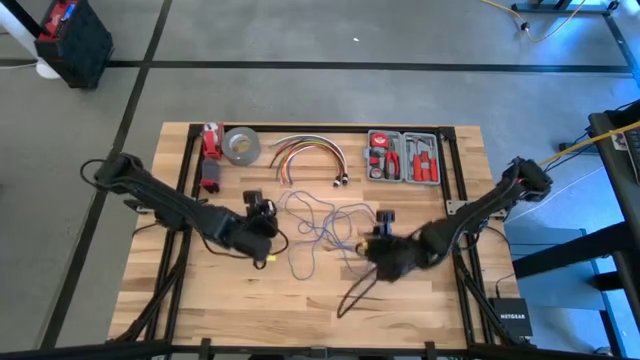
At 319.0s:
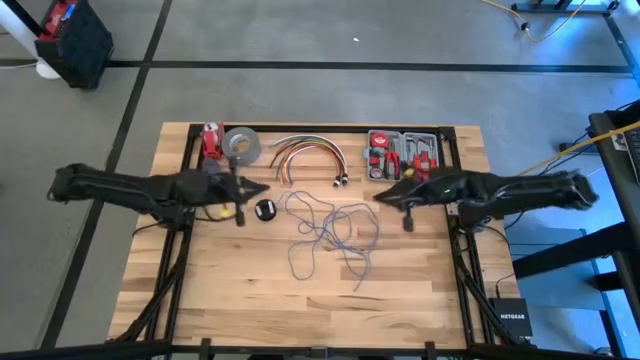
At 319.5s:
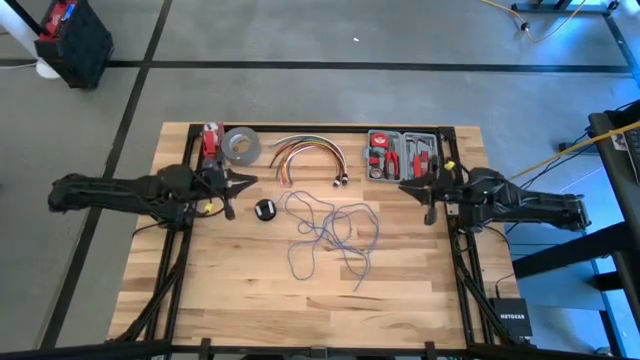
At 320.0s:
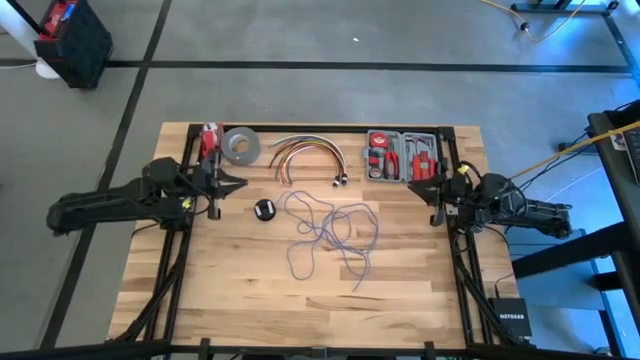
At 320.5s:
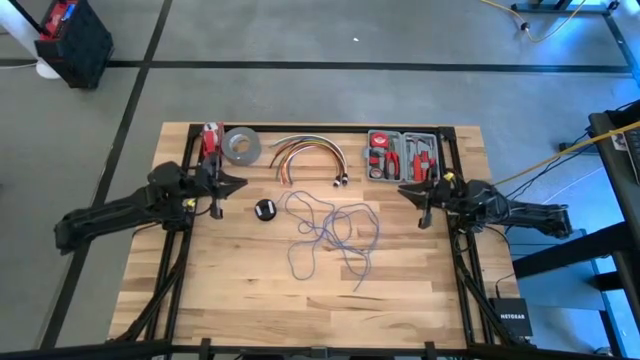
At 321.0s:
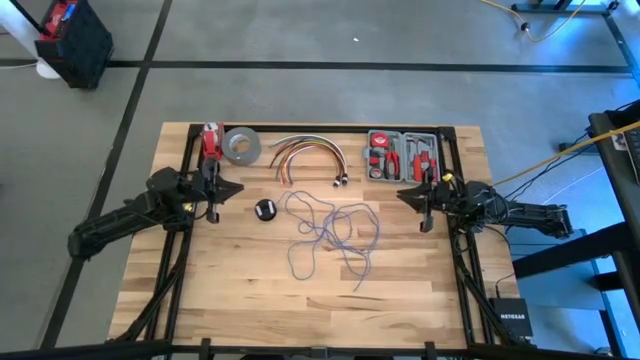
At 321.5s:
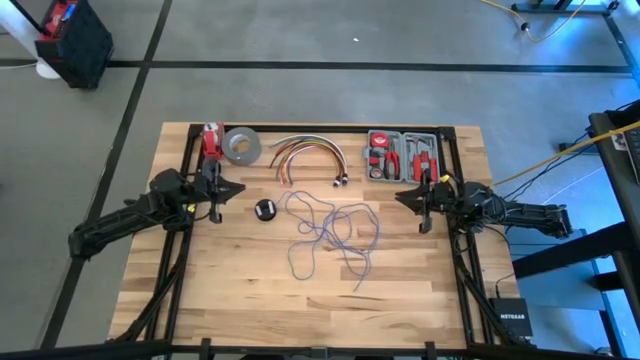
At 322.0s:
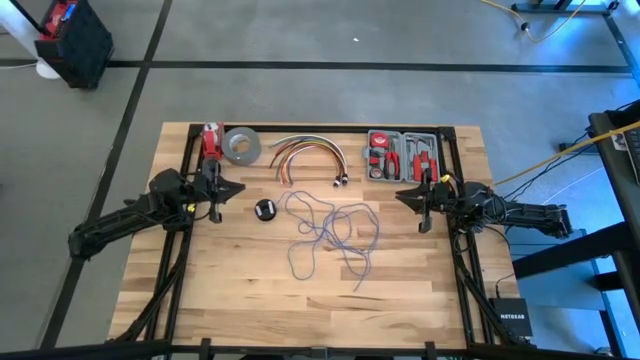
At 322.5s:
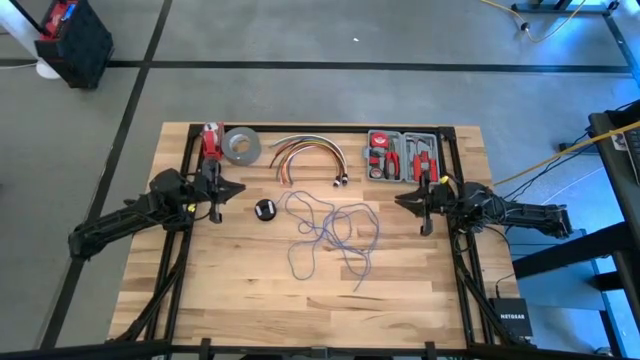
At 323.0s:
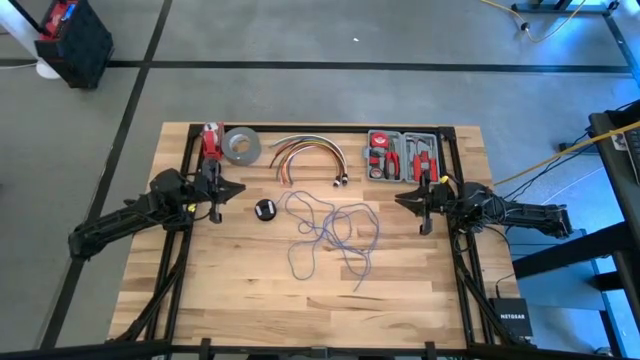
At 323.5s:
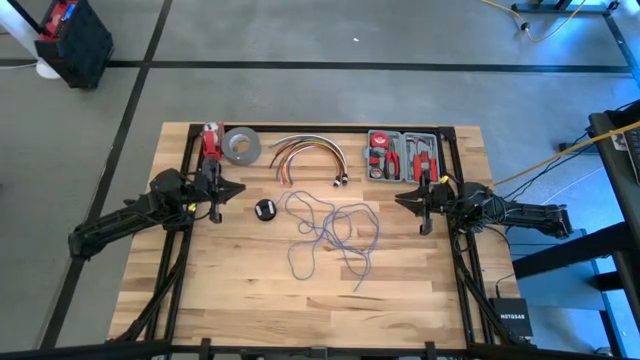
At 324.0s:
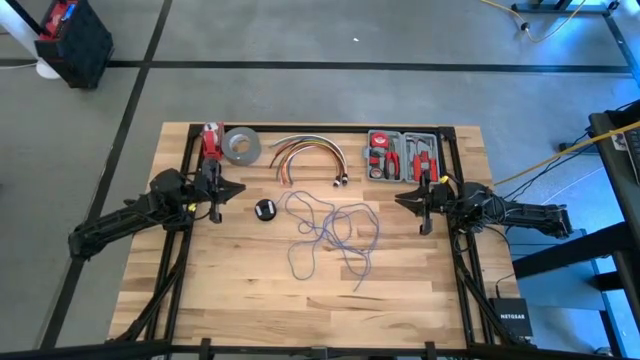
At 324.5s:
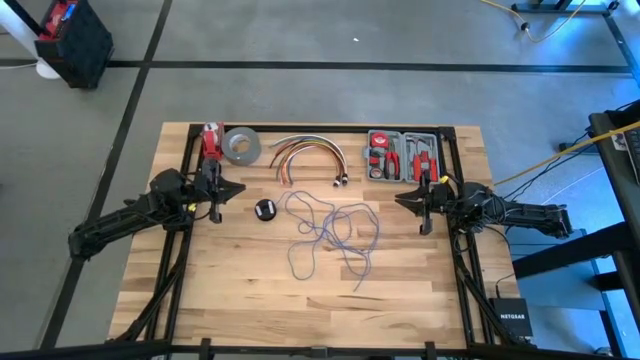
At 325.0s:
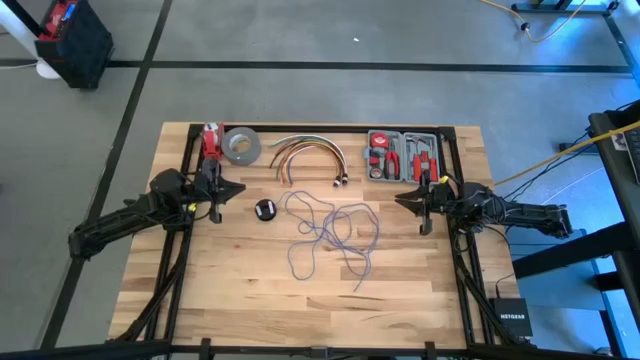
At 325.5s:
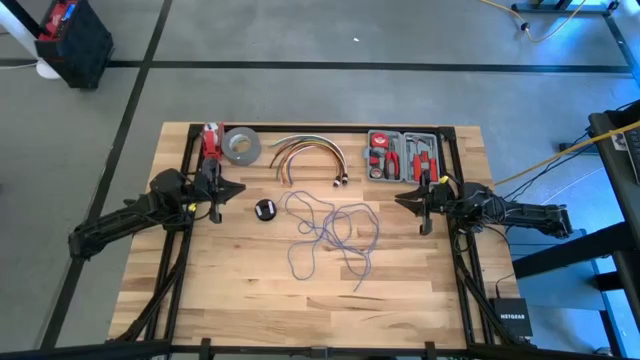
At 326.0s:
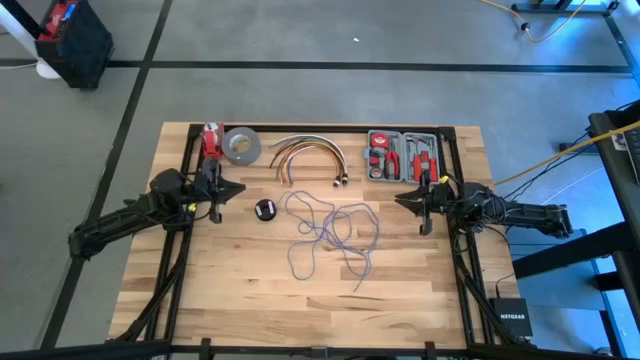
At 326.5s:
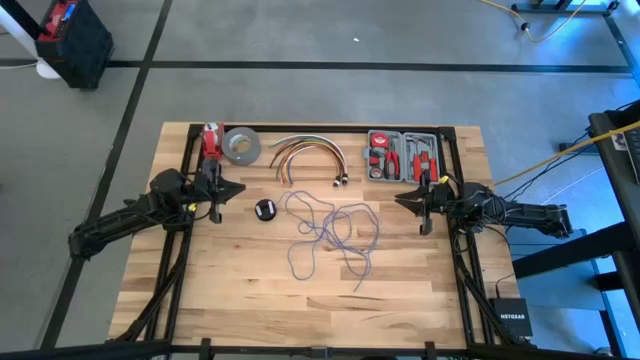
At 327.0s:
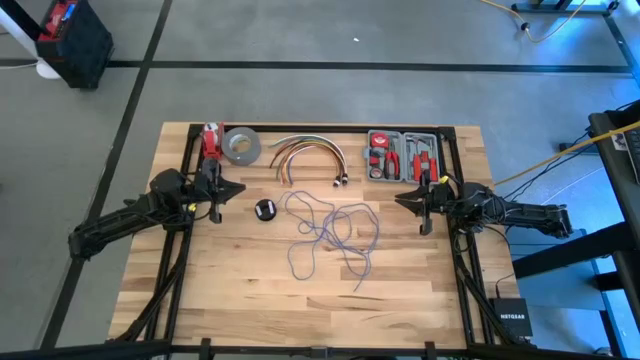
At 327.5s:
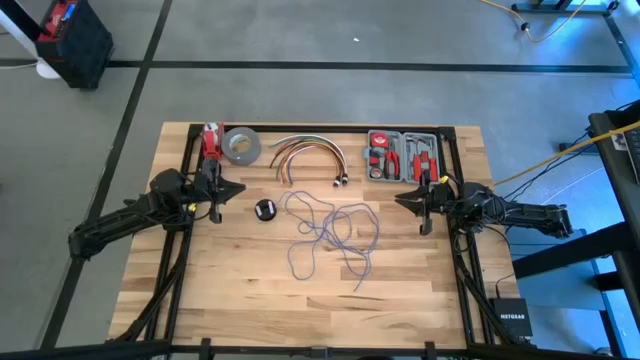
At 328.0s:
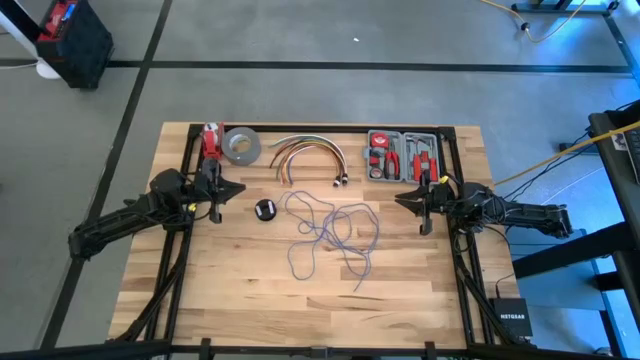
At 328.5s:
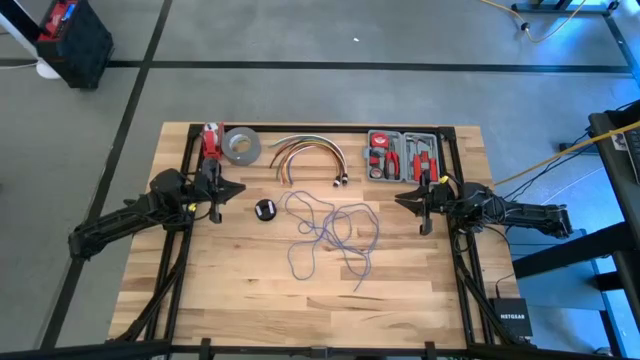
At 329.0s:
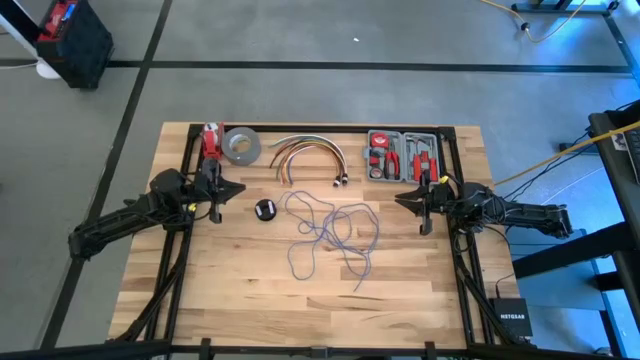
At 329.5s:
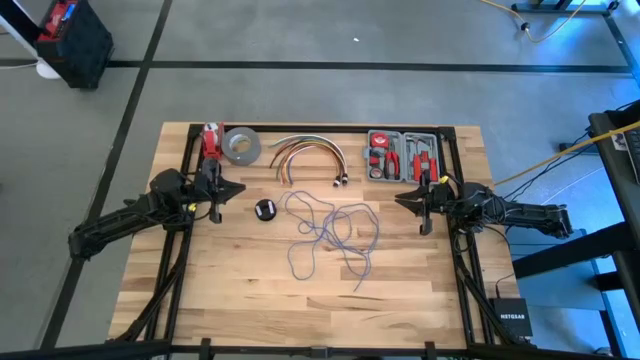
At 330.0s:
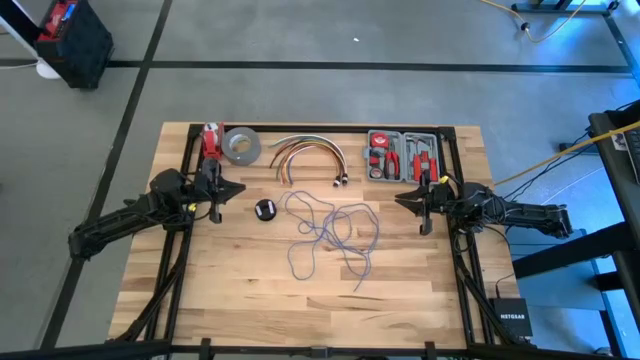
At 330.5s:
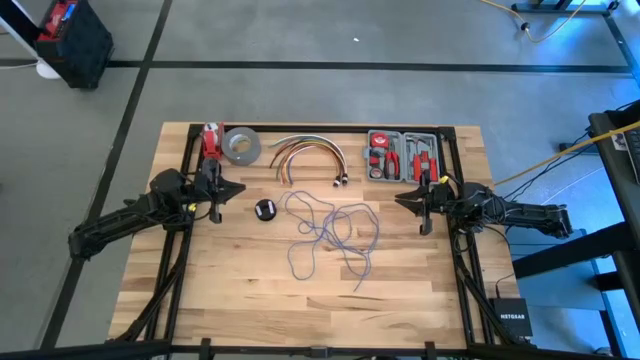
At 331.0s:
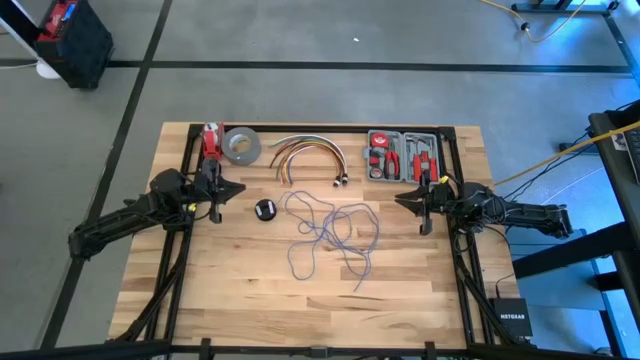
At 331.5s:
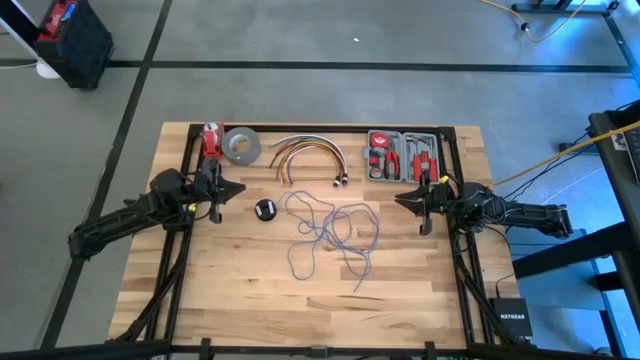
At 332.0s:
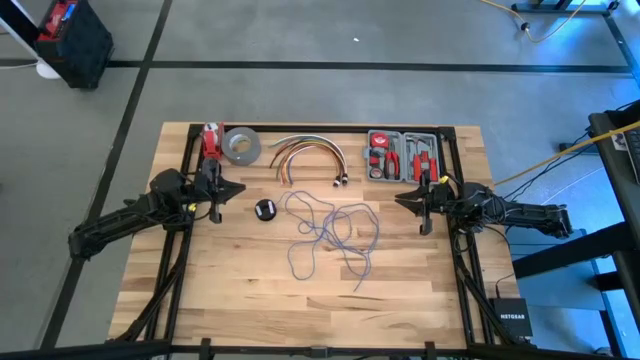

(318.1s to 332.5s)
Task: Coil cords
Return to Home Position

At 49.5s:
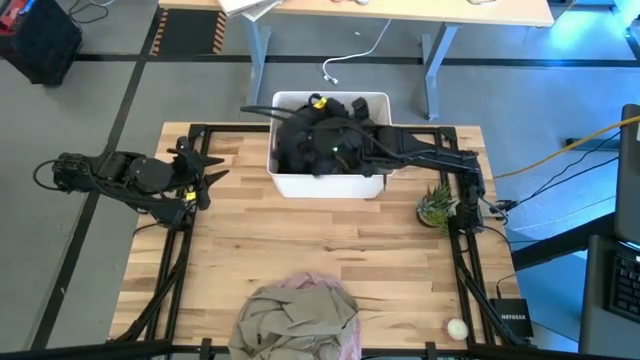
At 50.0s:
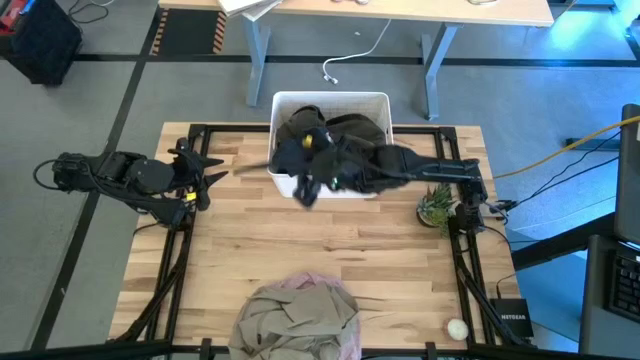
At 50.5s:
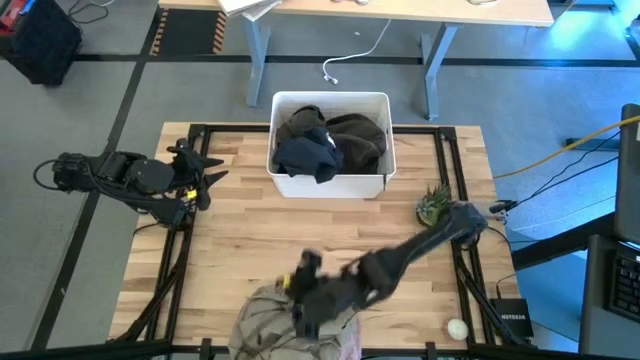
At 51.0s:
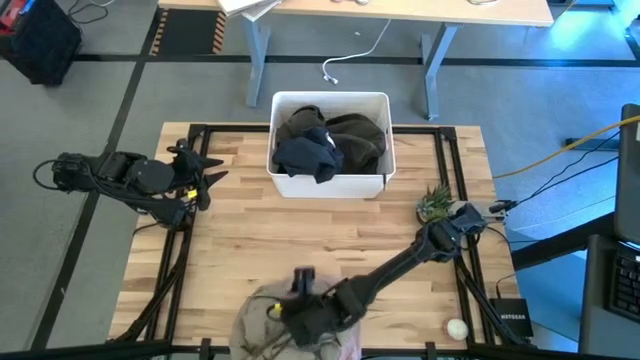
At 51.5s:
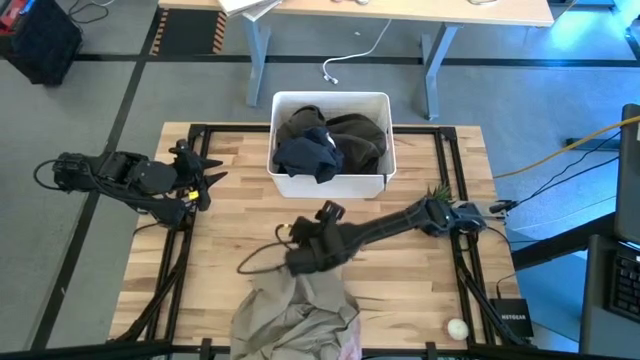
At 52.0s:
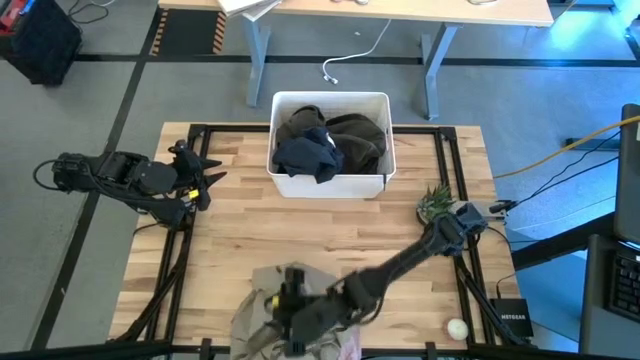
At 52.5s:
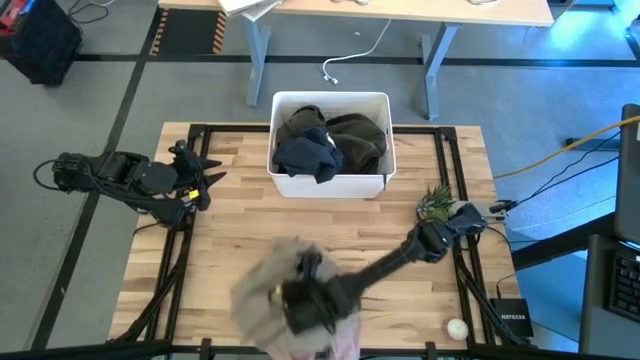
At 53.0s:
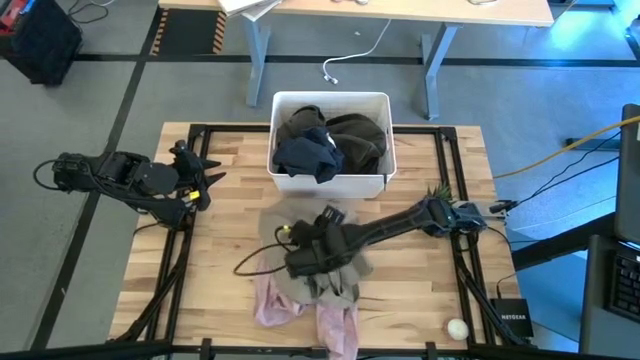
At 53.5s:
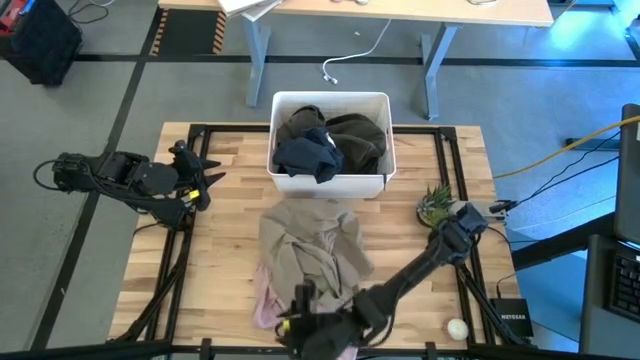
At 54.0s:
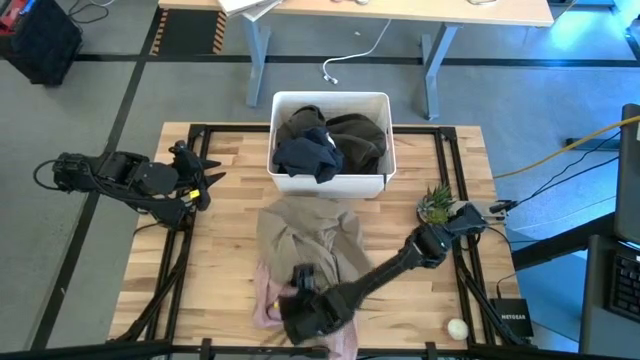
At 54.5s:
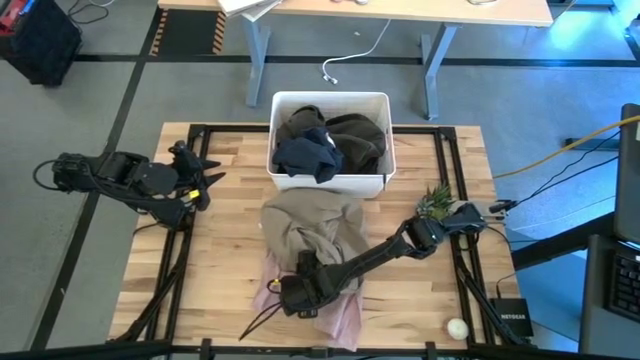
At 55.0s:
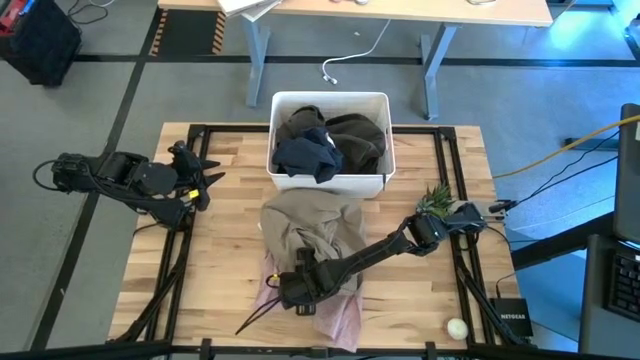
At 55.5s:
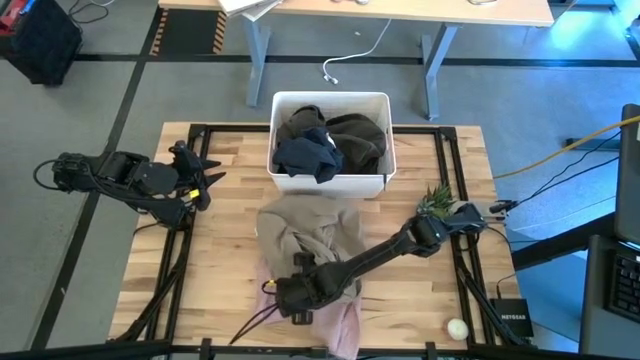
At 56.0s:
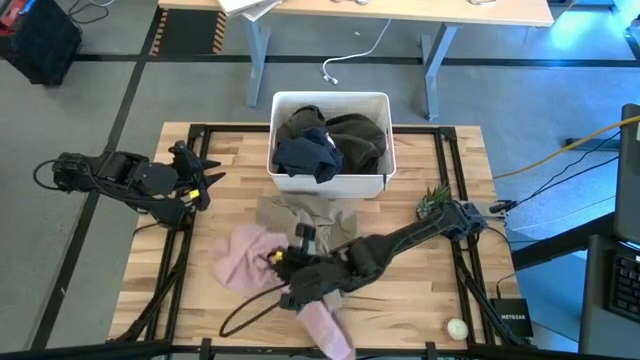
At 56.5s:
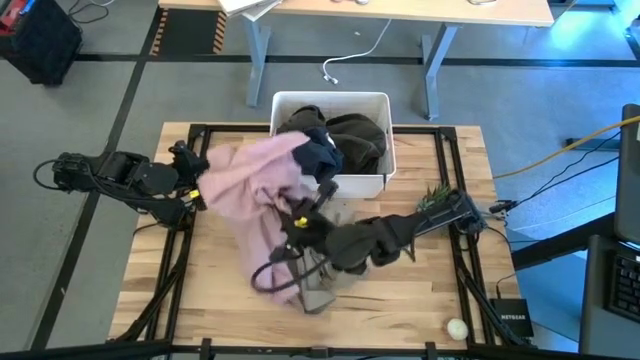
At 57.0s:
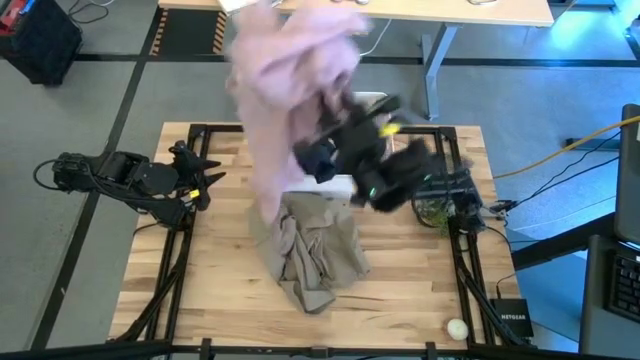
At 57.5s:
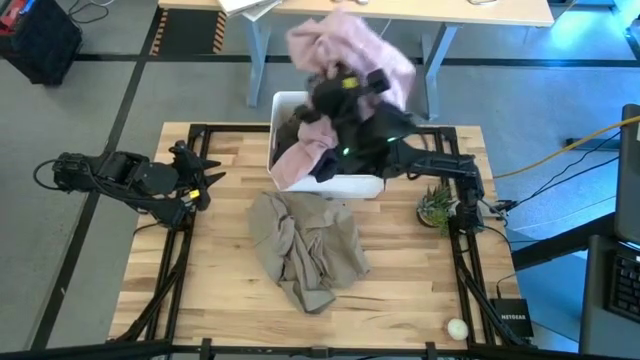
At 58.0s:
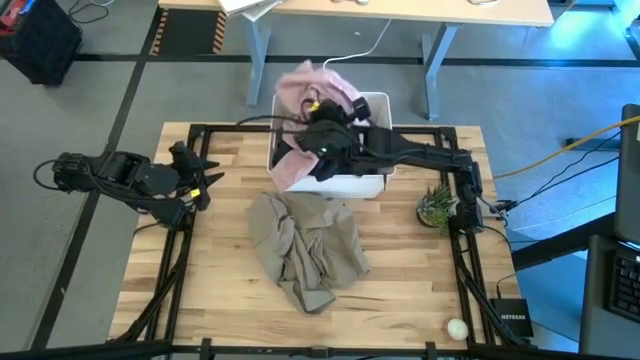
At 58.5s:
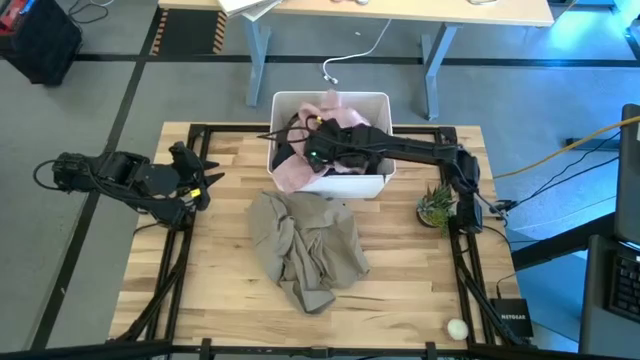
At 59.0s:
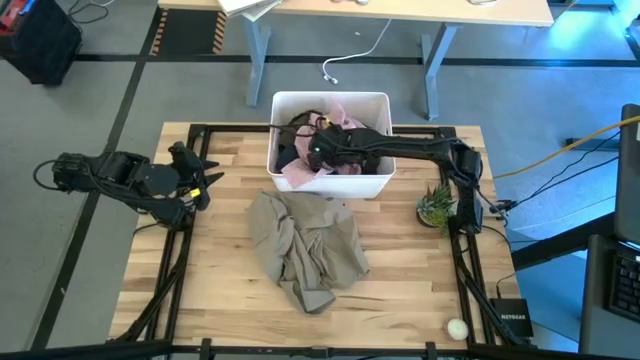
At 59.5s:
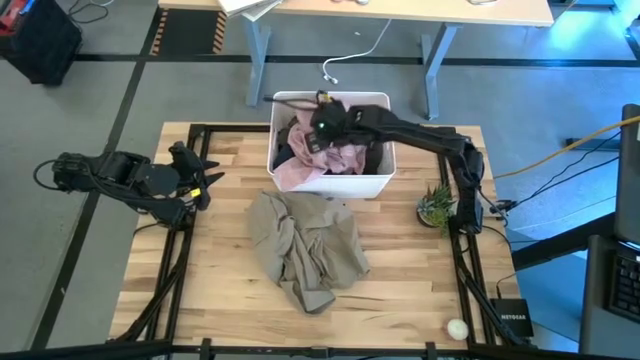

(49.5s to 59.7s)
Task: Sort clothes
Put the pink polo shirt into the white bin
